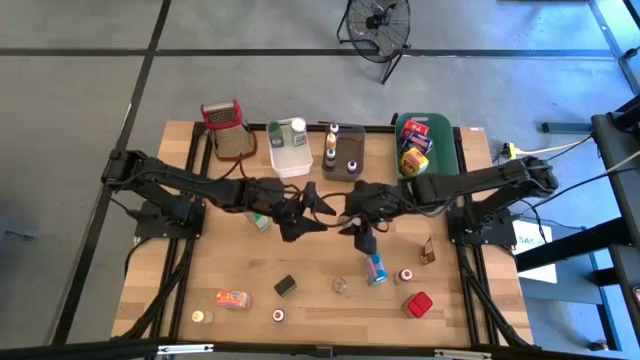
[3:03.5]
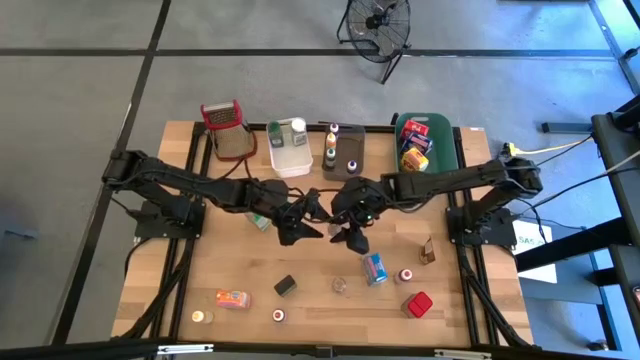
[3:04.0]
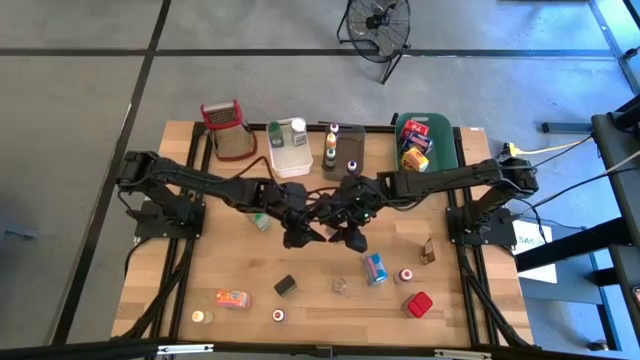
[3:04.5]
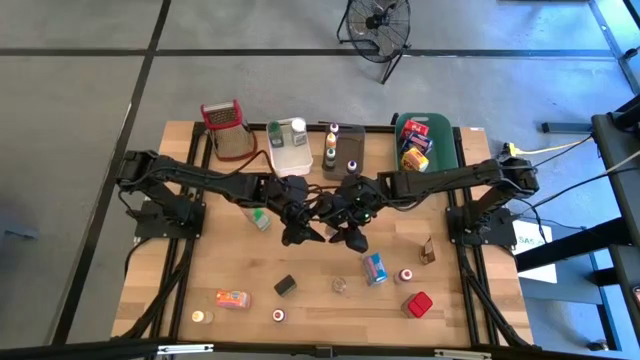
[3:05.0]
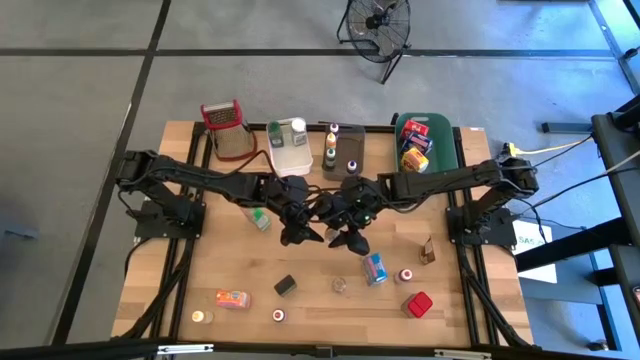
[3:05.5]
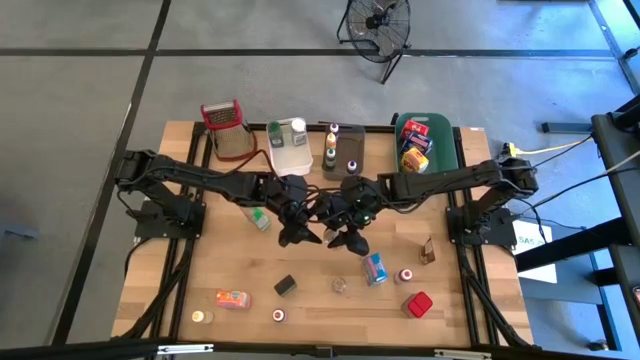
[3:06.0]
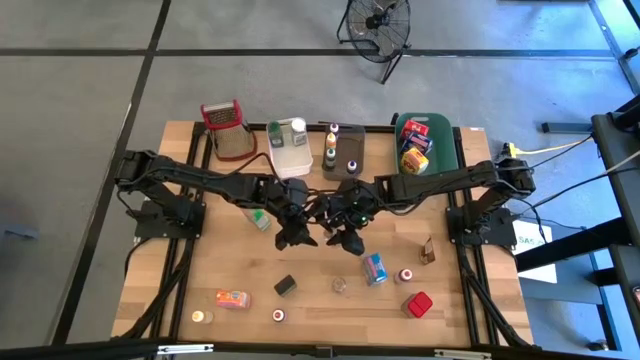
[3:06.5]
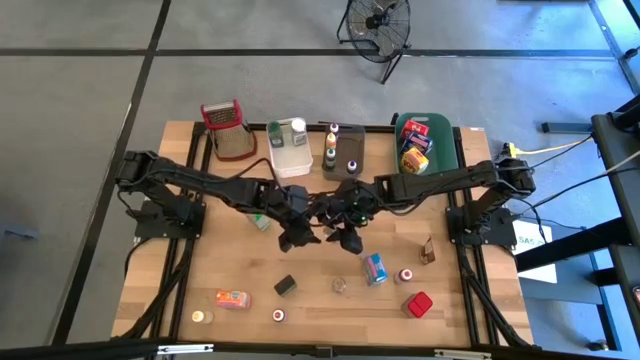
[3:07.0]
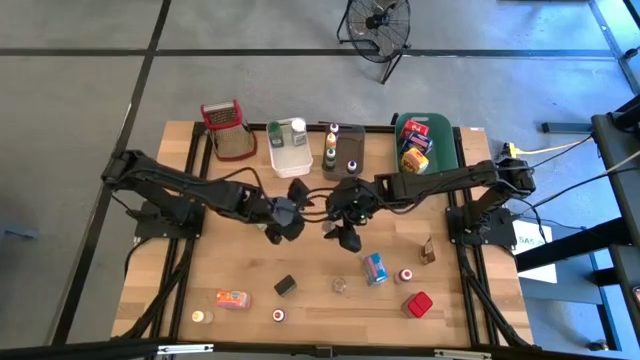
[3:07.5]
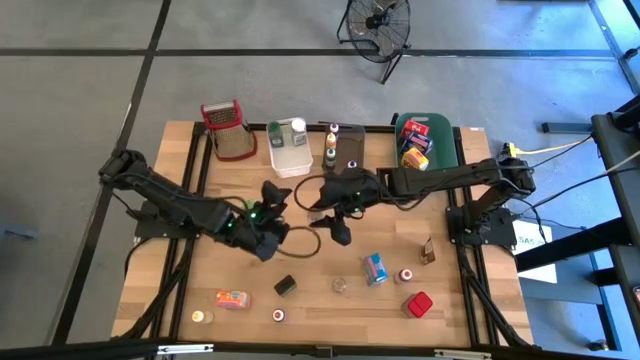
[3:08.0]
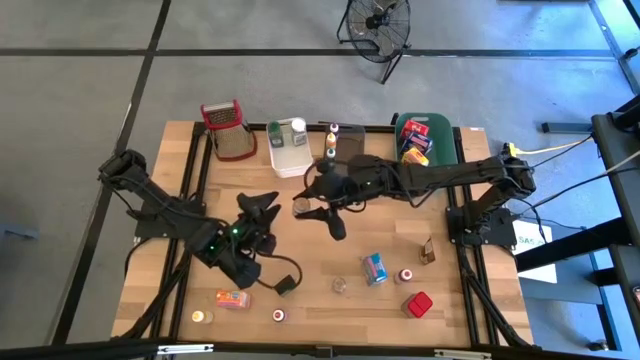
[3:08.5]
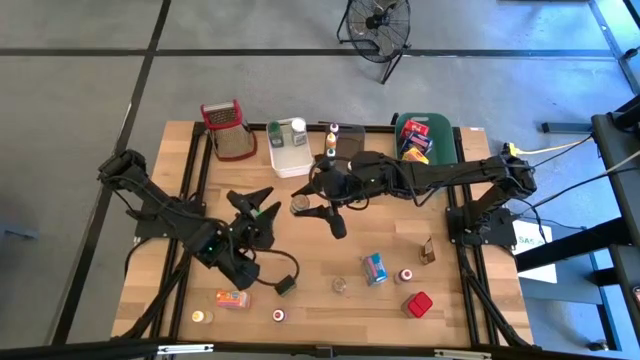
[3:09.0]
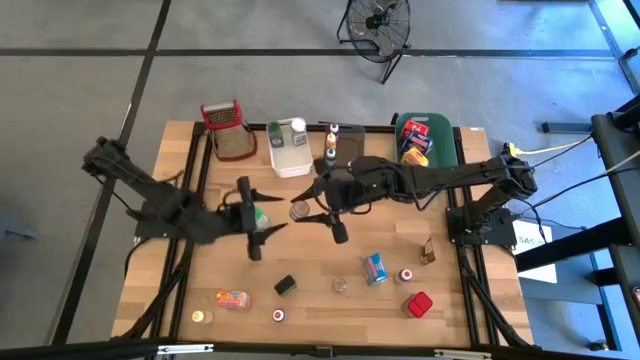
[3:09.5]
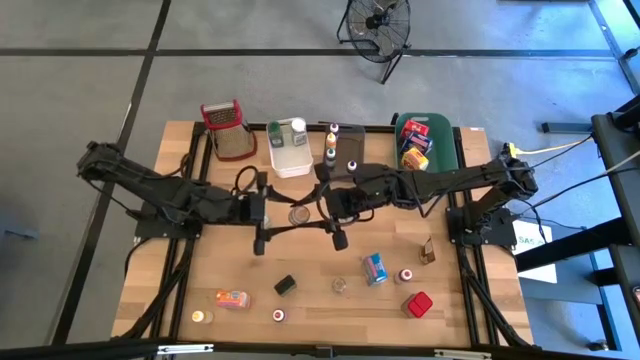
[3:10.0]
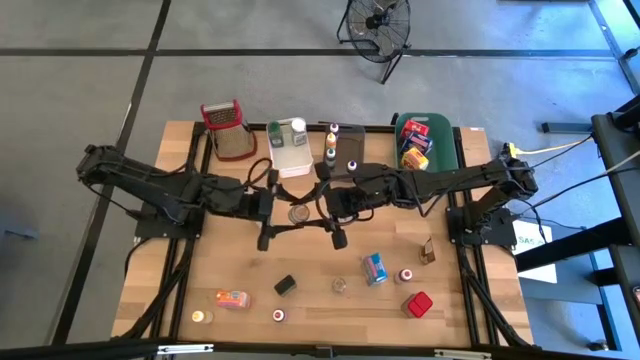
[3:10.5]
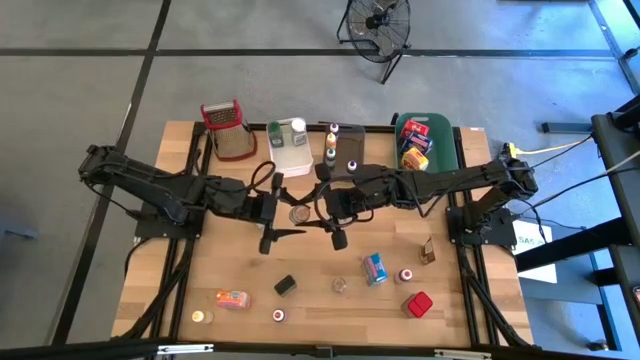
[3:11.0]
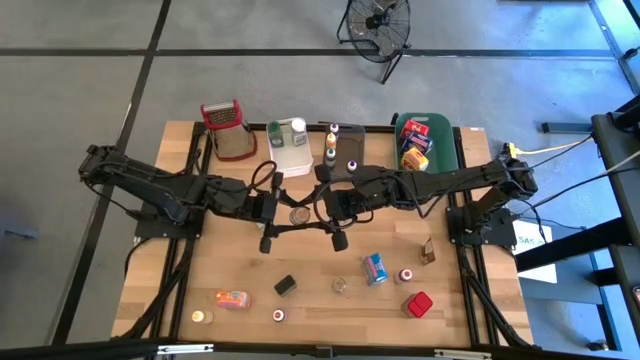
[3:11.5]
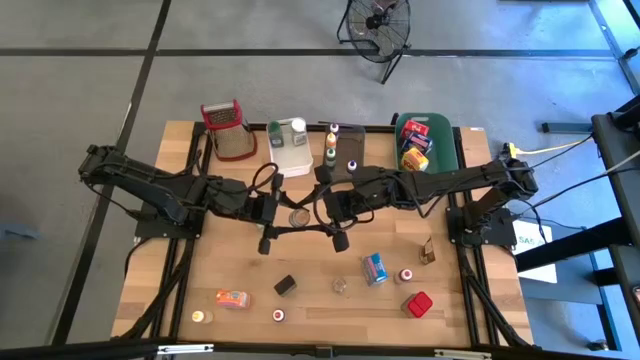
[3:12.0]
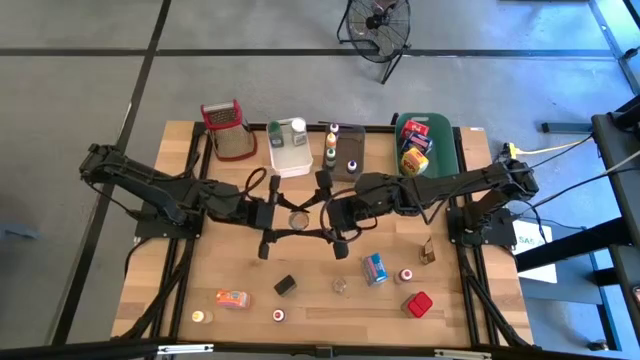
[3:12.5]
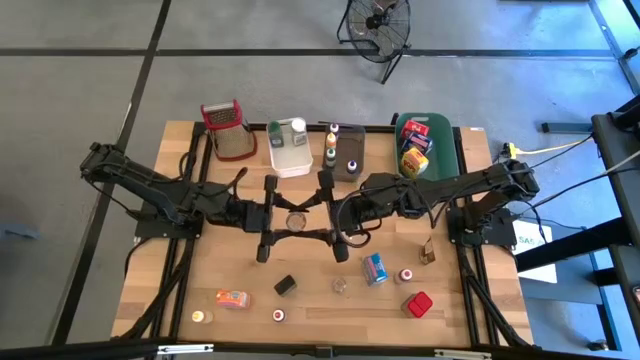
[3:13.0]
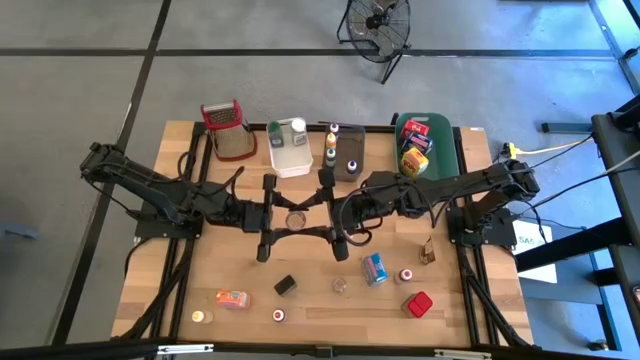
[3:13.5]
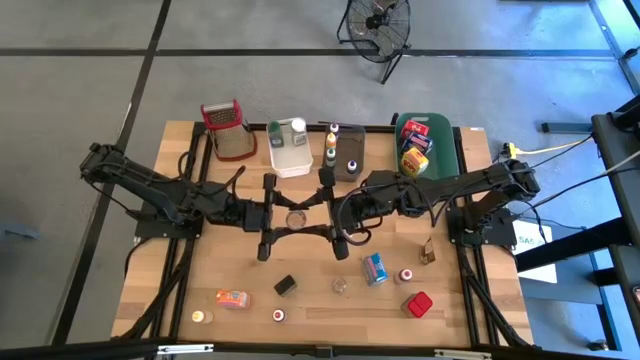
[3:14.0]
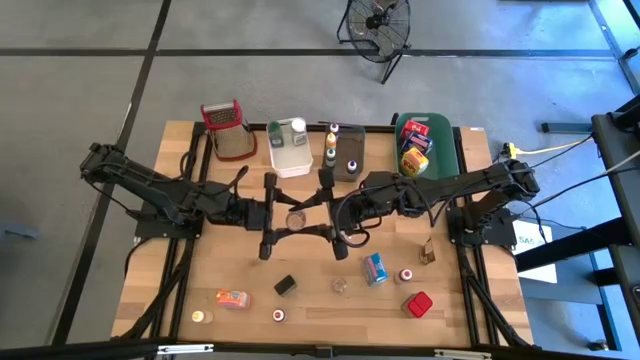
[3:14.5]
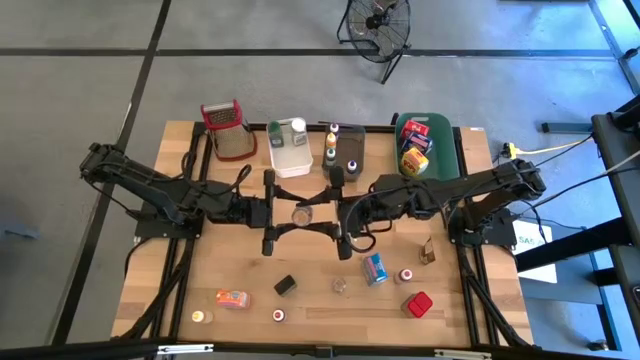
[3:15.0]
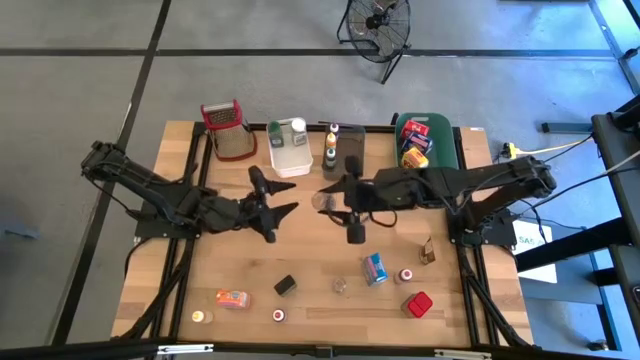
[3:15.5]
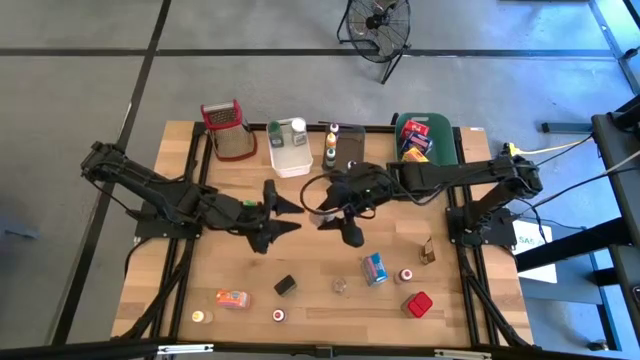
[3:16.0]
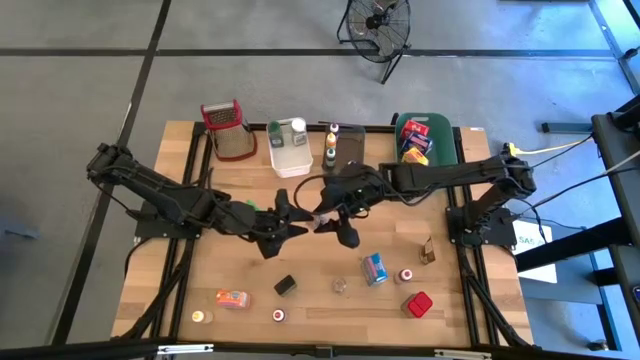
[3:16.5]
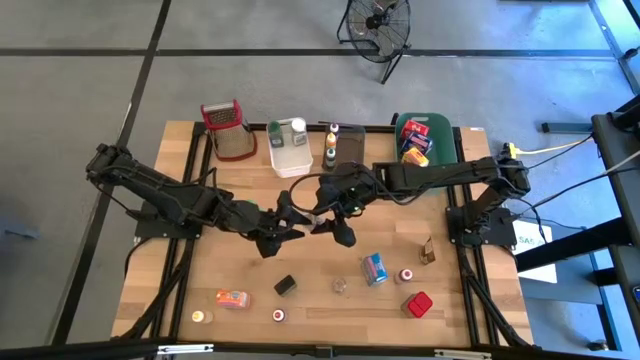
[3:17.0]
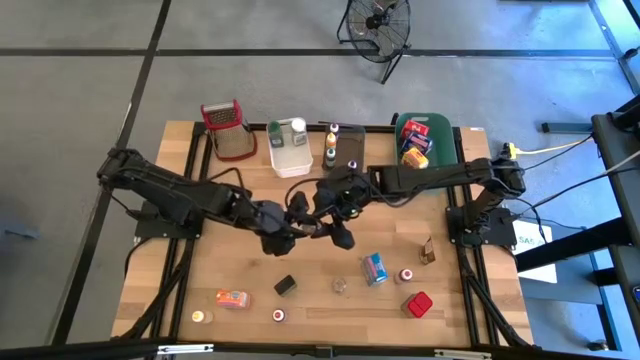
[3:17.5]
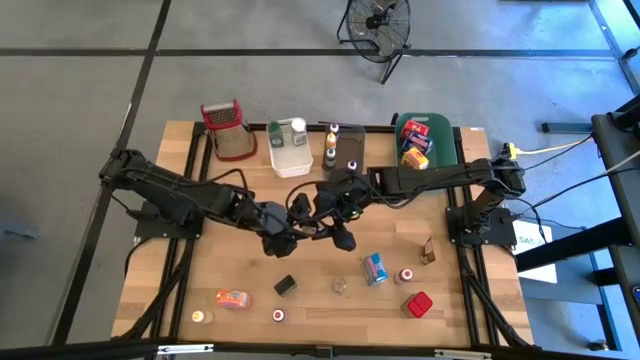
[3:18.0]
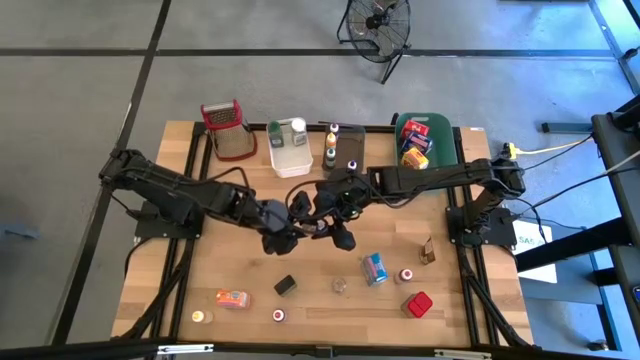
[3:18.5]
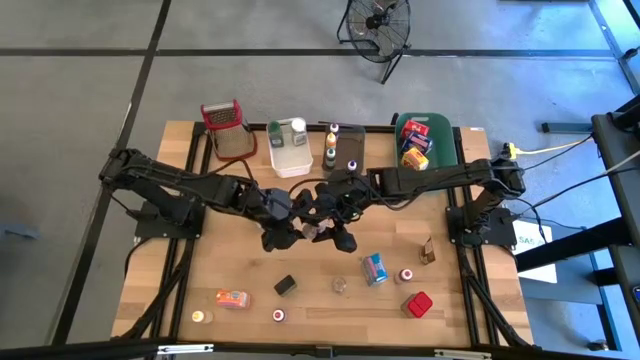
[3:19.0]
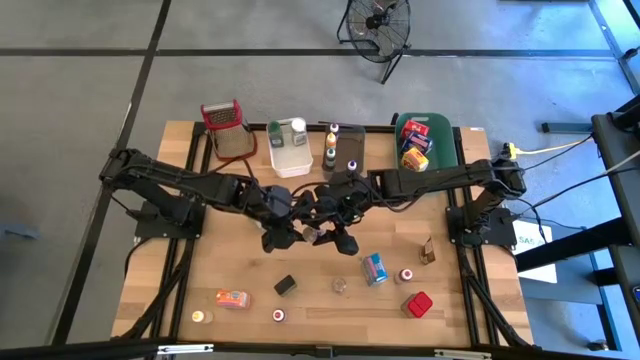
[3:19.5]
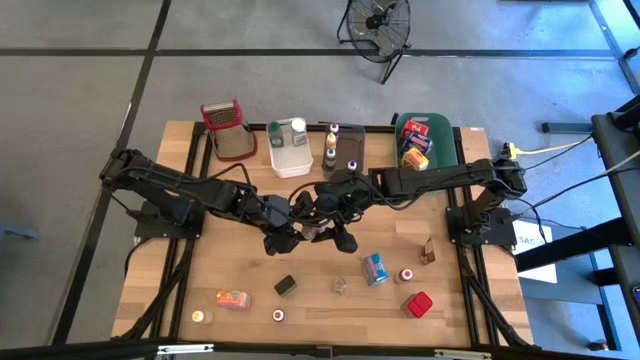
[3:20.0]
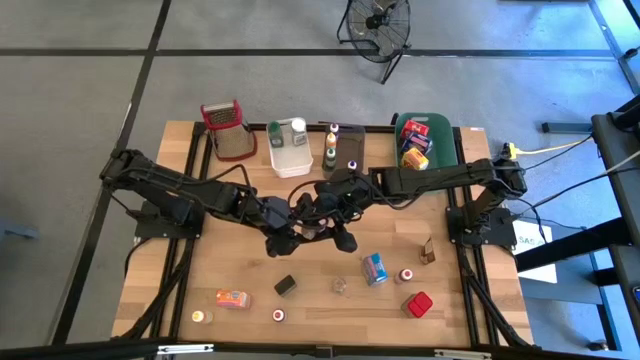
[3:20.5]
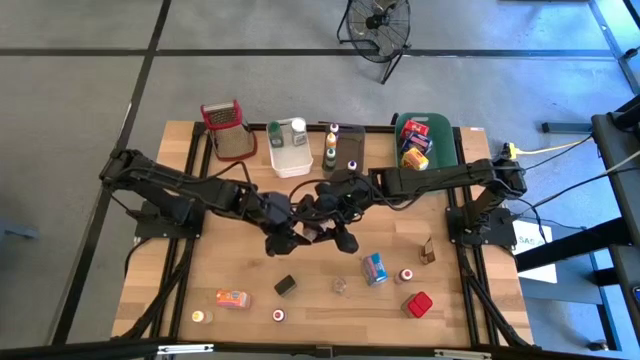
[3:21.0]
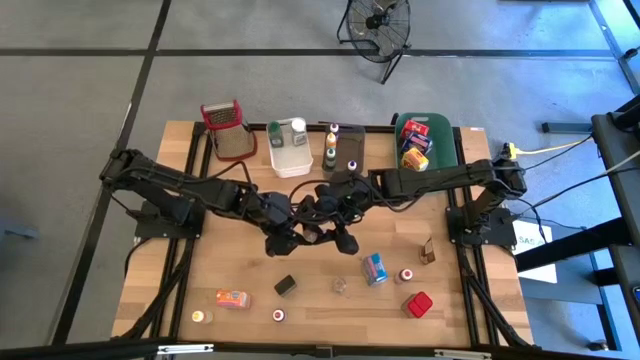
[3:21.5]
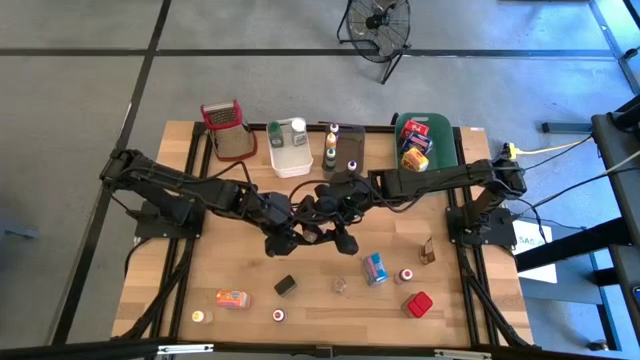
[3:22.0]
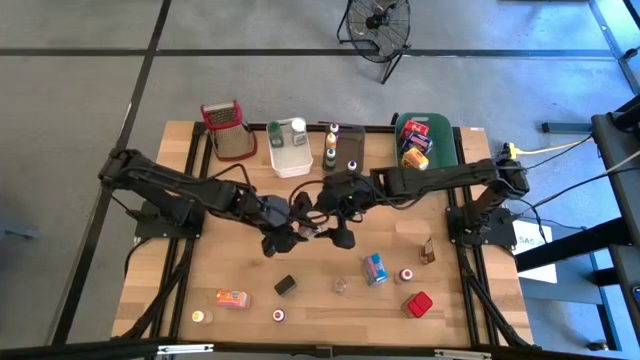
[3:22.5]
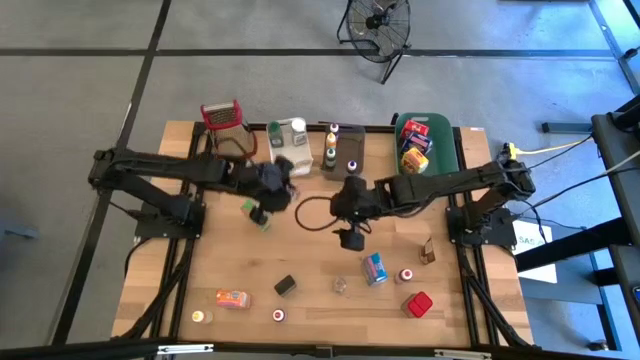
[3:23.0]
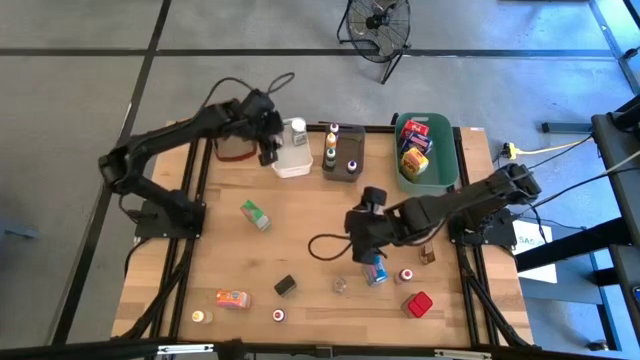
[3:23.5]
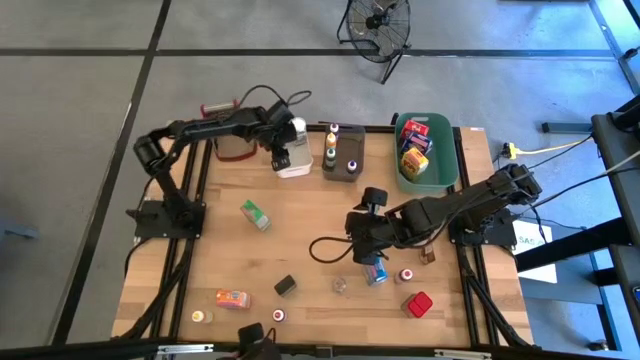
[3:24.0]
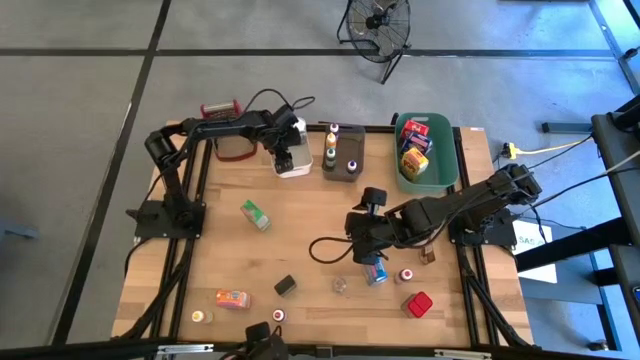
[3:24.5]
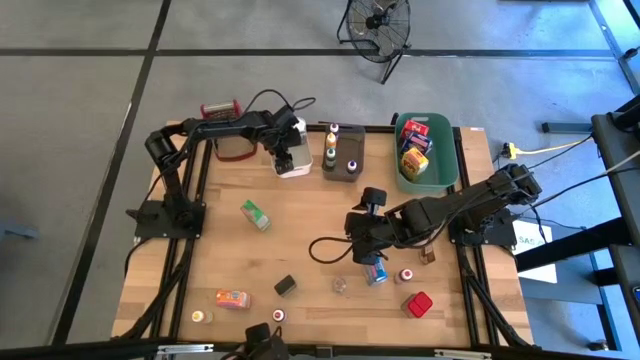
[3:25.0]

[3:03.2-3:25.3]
Task: Pick & Place Kitchen Items
Put the transparent seasoning into the white bin
